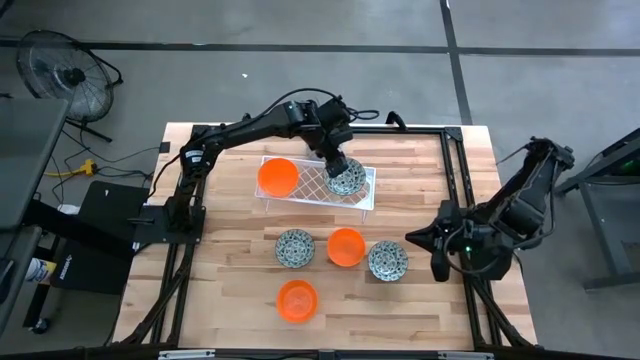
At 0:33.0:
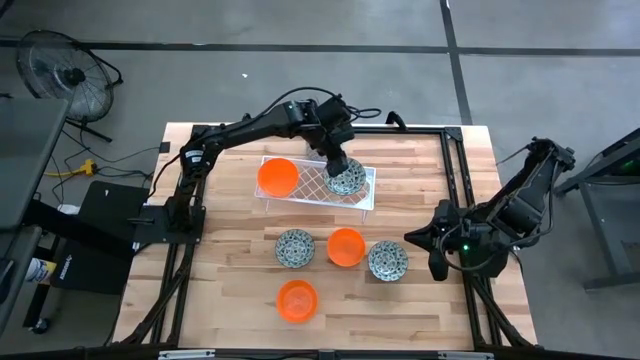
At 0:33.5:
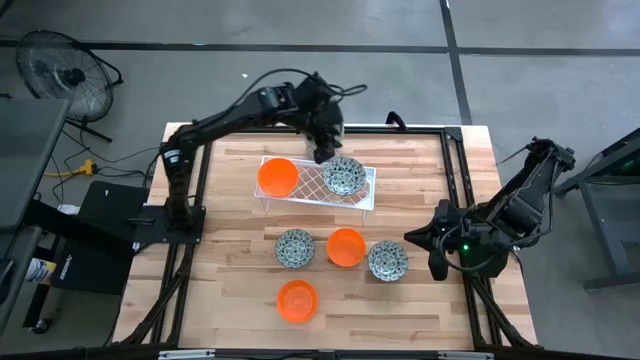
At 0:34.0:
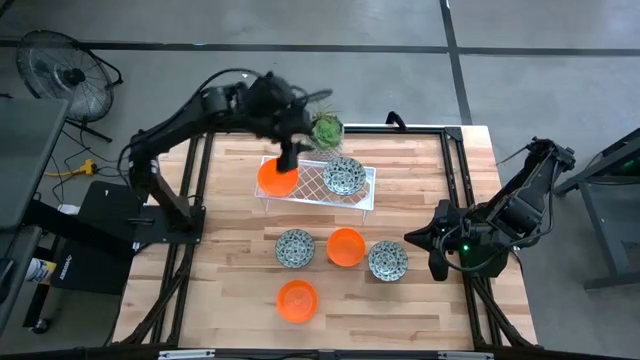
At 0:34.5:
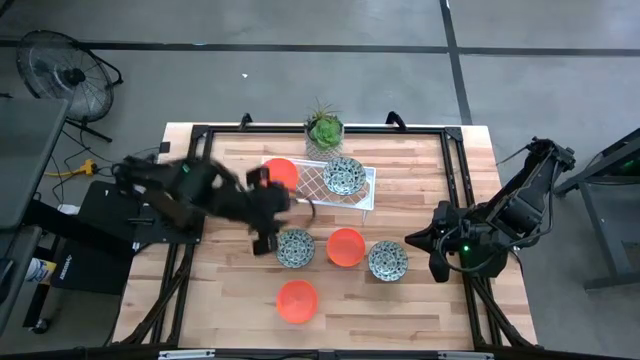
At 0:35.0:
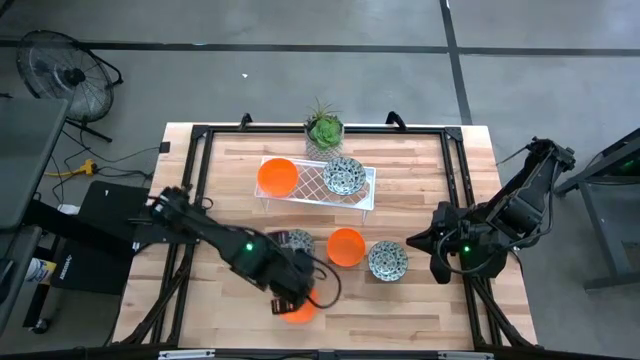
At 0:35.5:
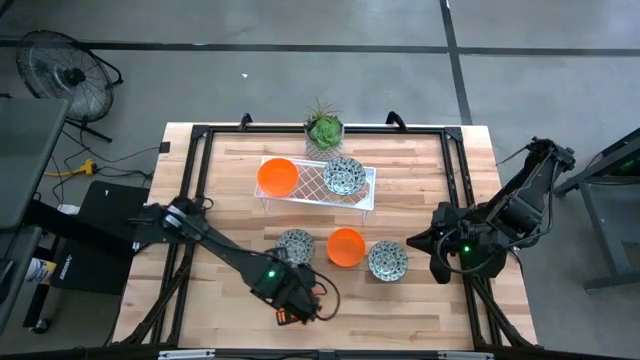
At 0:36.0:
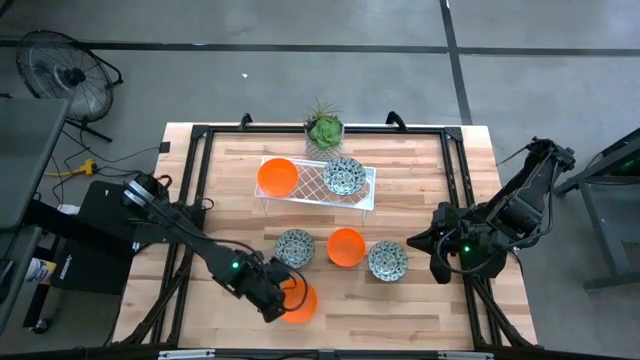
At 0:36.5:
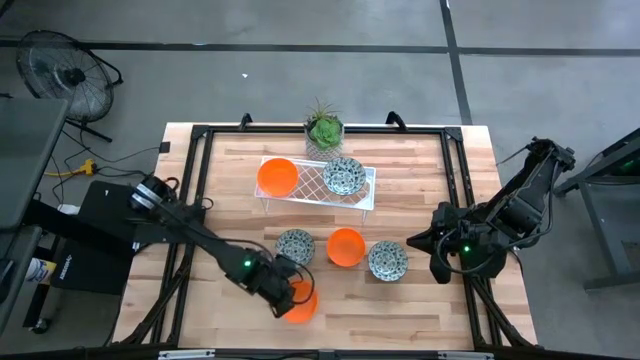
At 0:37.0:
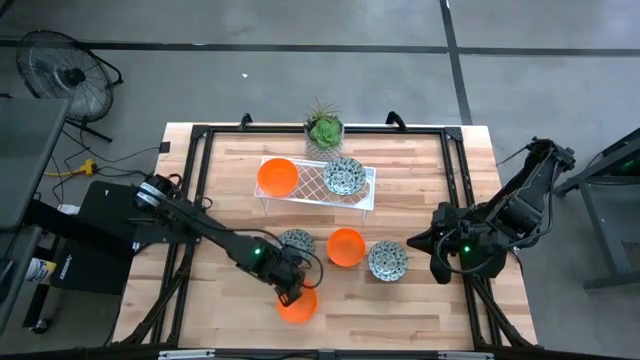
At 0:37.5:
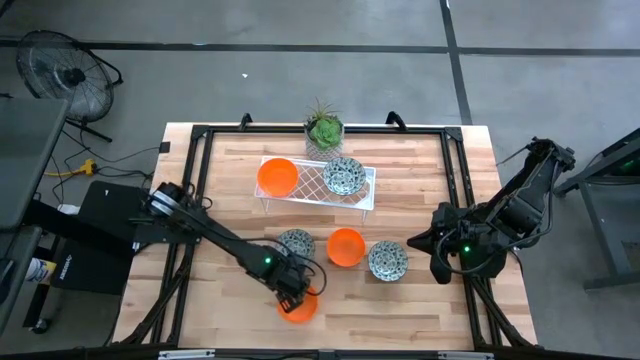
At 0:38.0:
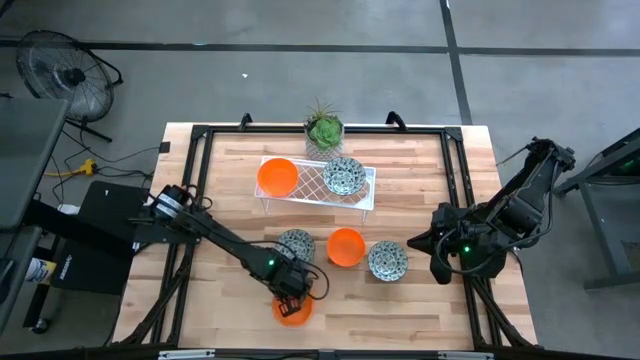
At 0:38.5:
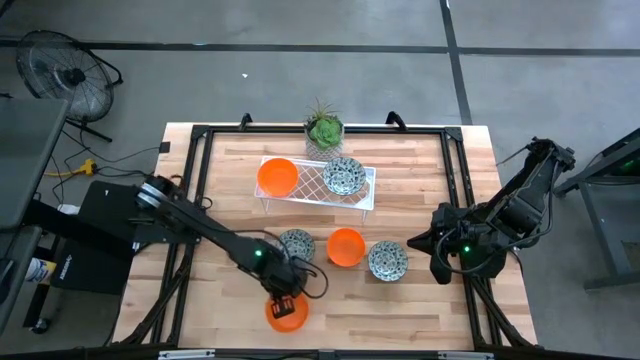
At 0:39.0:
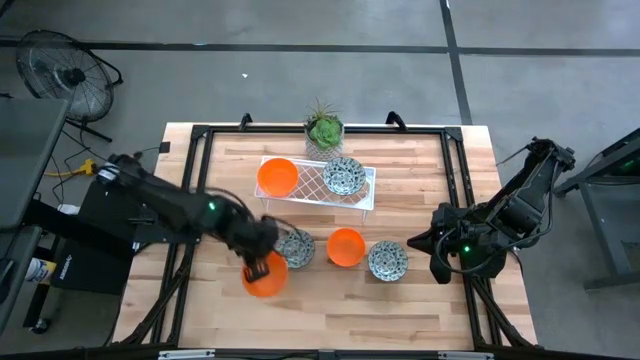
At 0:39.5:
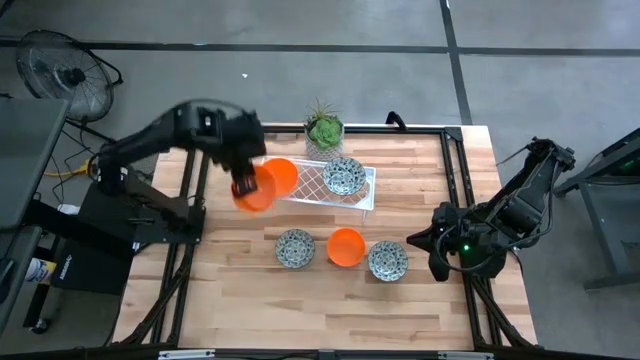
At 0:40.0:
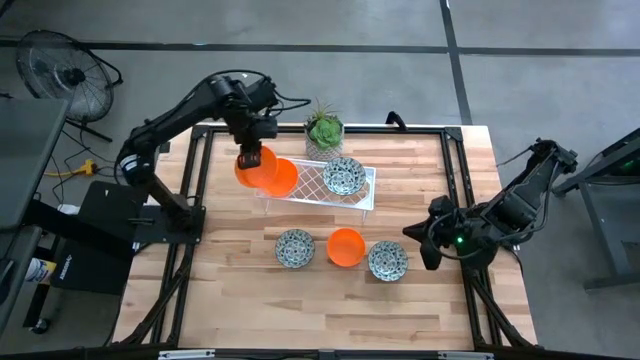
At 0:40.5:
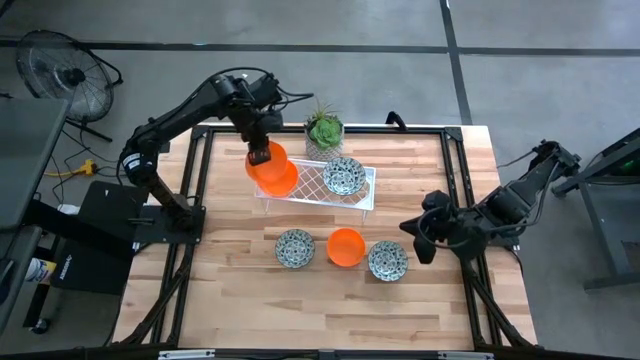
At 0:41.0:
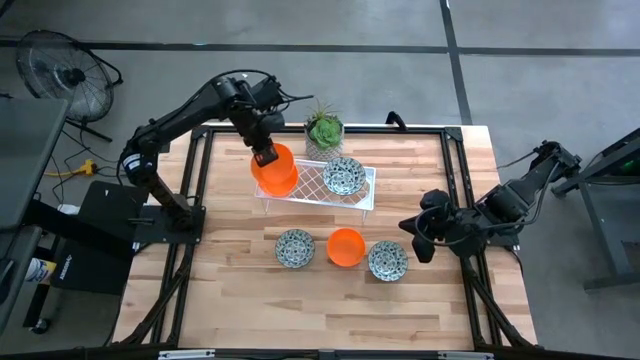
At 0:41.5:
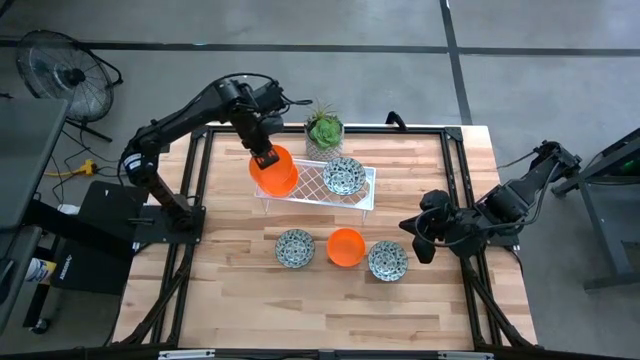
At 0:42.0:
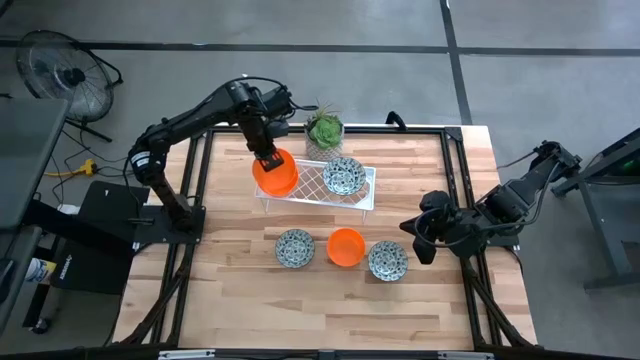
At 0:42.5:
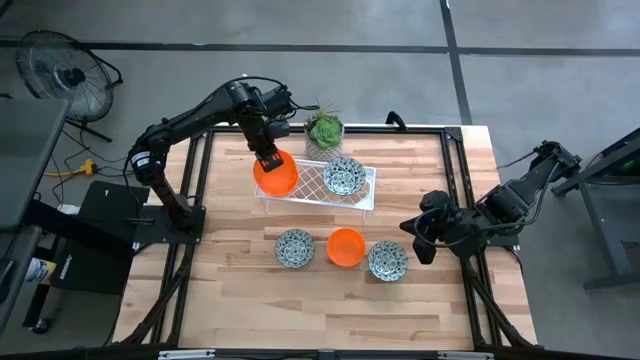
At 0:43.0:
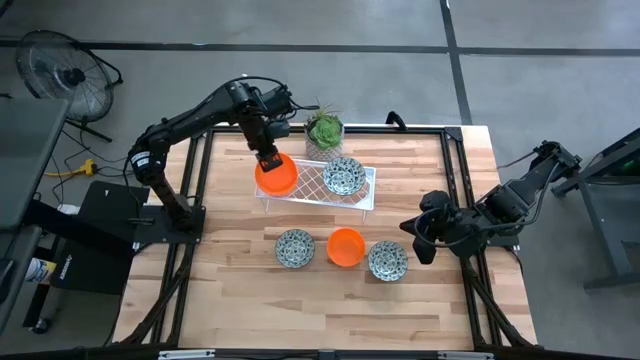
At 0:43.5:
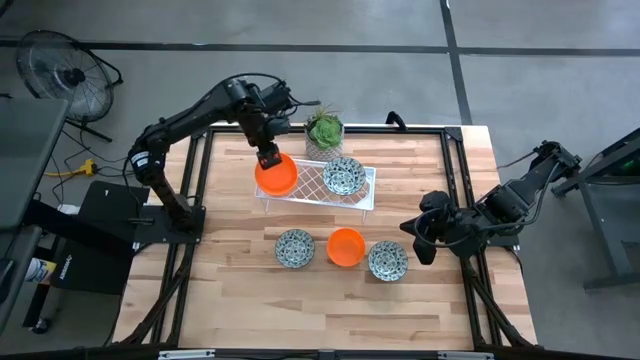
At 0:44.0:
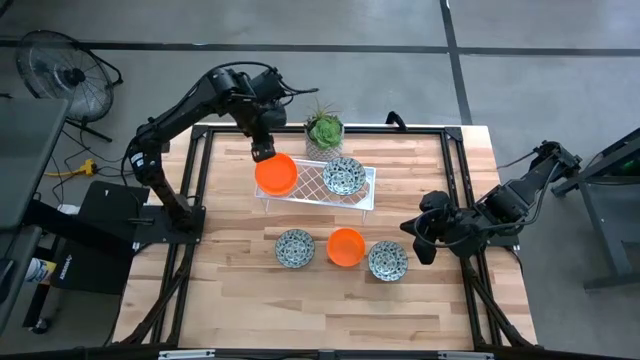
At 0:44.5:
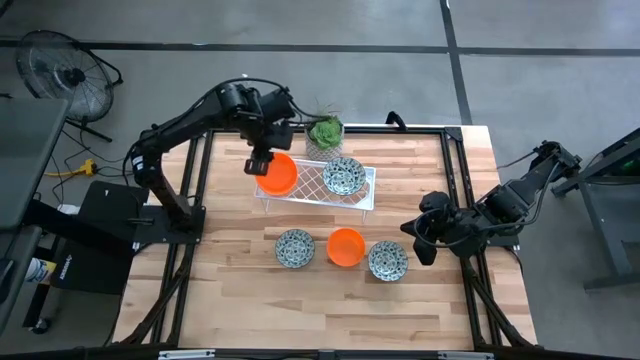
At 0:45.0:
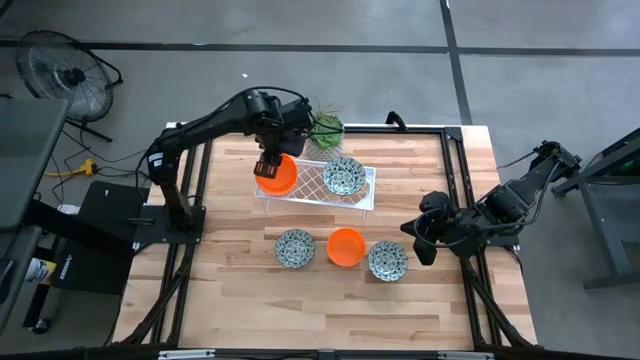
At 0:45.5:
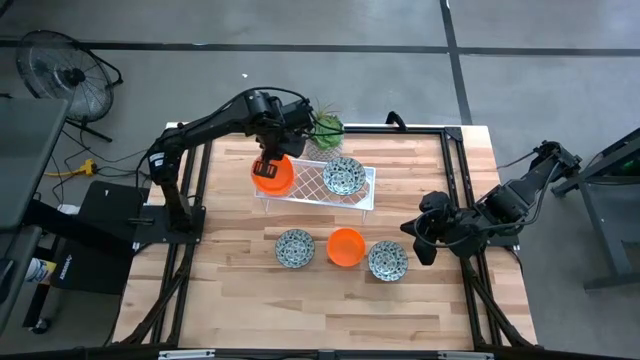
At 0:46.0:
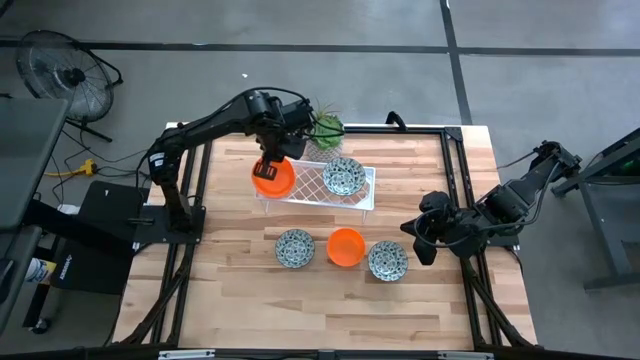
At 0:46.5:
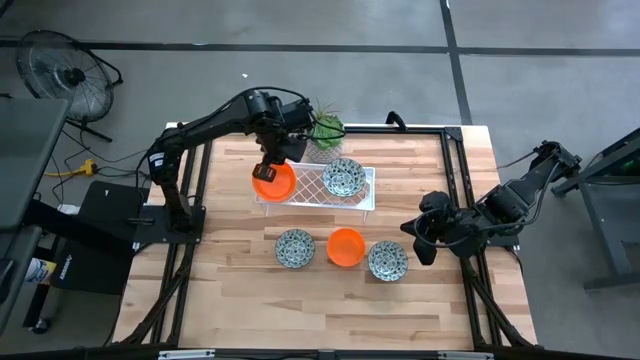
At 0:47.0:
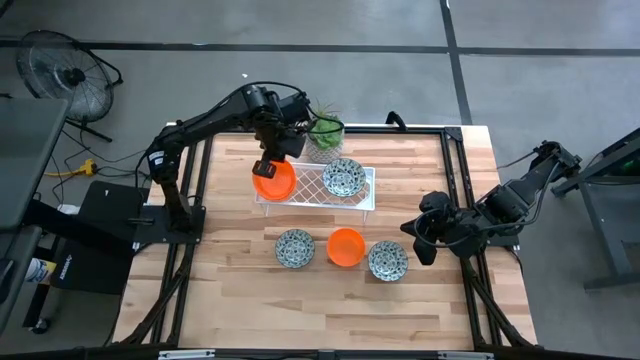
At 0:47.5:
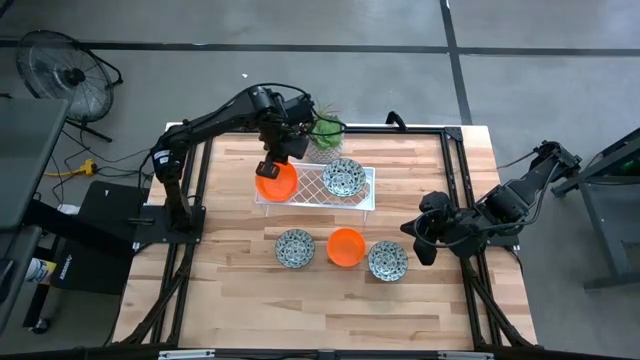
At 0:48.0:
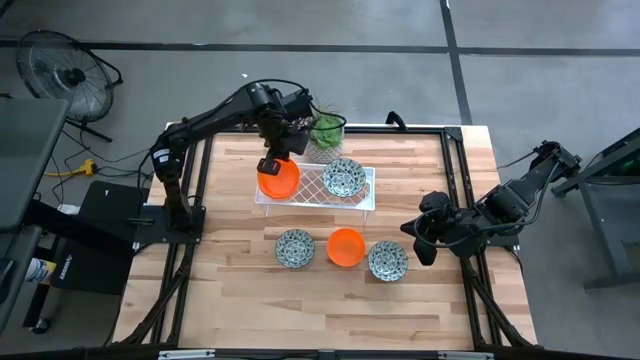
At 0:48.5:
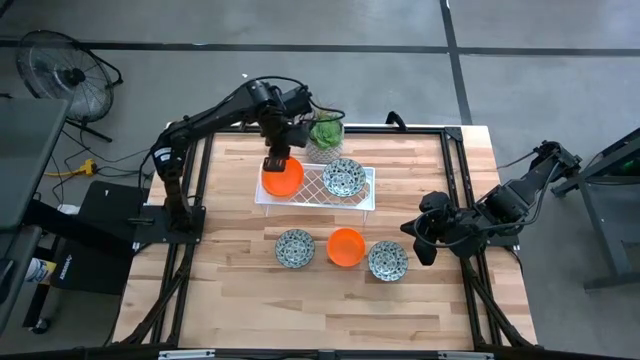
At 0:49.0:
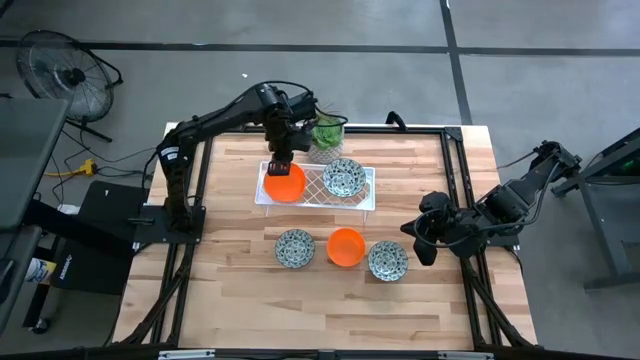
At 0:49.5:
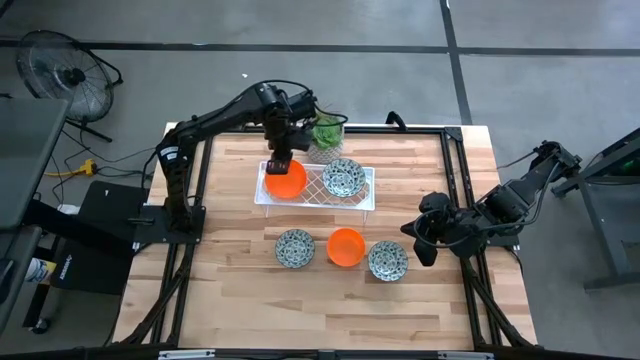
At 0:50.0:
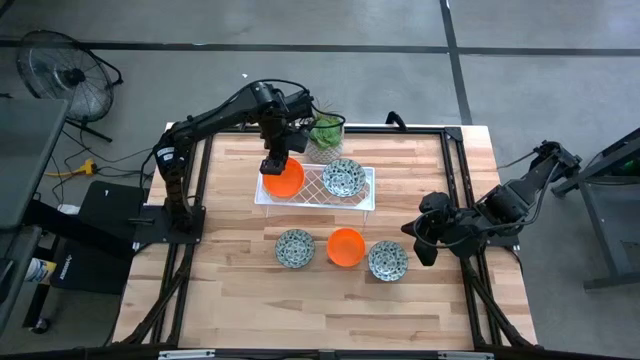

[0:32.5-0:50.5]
Task: Pick & Place Mini bowls
Stack the bottom orange bowl on the orange bowl on the shelf
